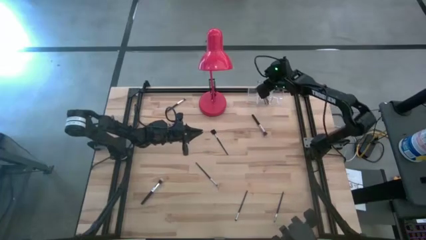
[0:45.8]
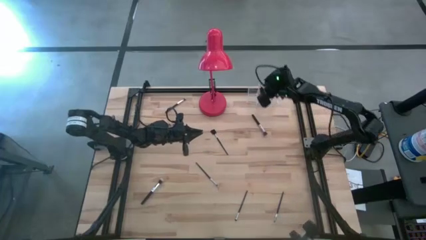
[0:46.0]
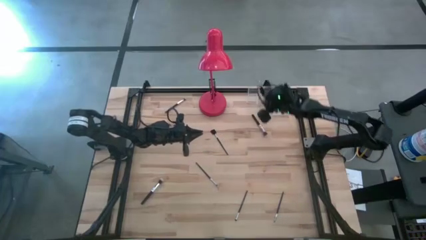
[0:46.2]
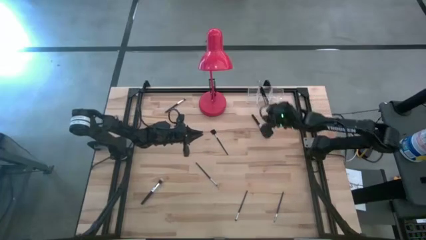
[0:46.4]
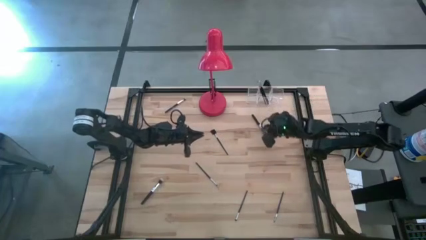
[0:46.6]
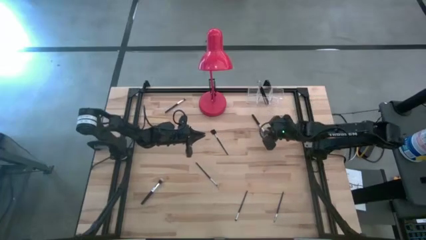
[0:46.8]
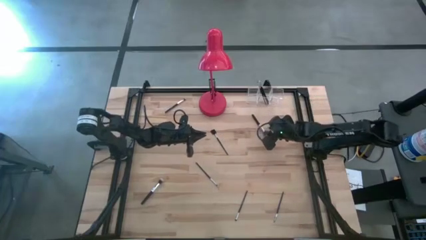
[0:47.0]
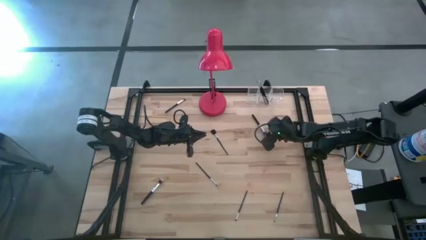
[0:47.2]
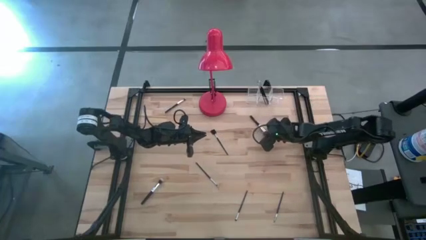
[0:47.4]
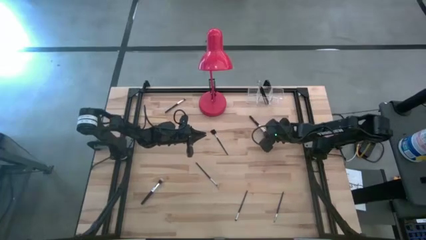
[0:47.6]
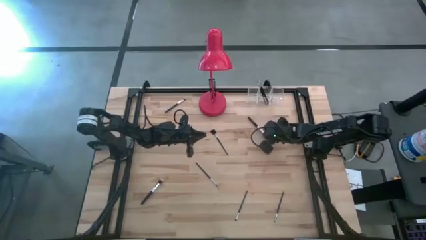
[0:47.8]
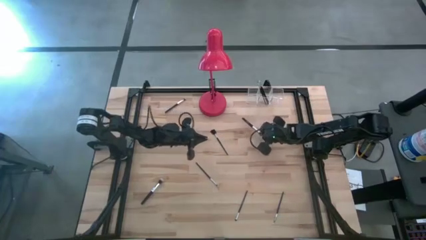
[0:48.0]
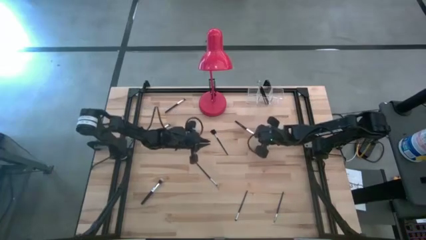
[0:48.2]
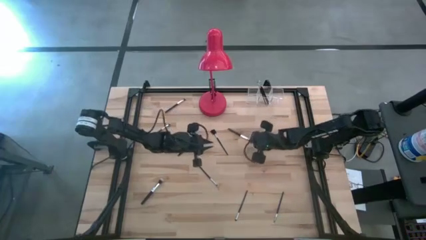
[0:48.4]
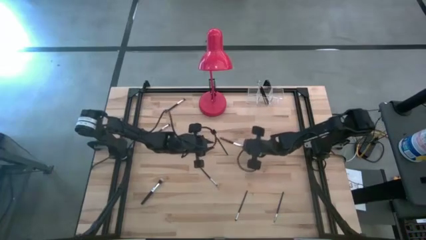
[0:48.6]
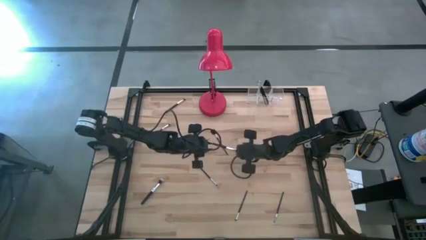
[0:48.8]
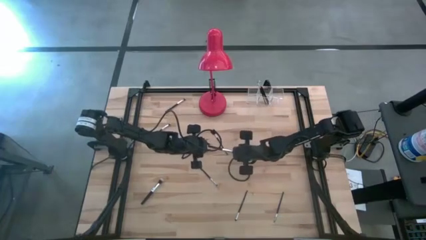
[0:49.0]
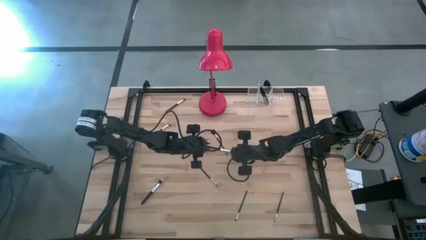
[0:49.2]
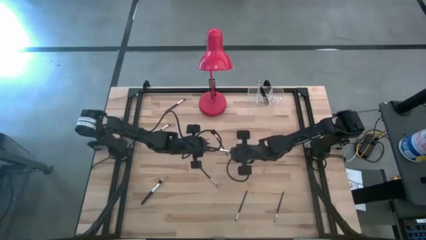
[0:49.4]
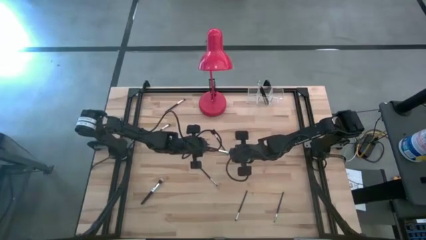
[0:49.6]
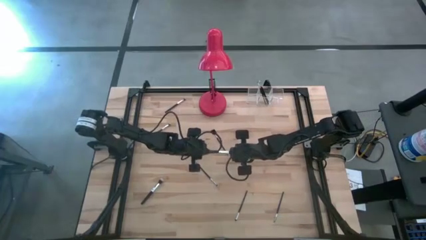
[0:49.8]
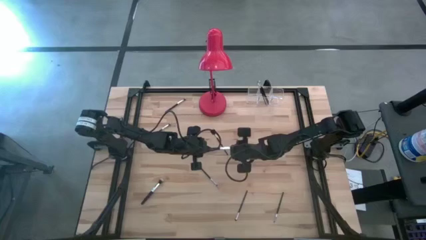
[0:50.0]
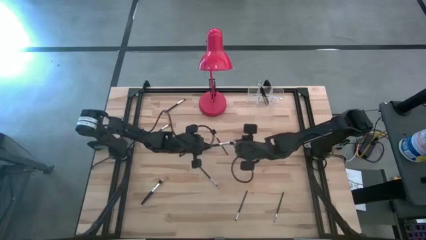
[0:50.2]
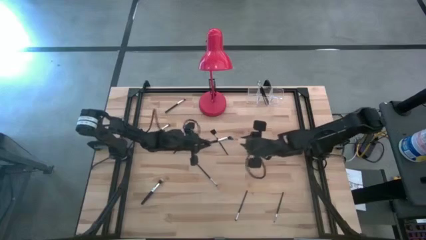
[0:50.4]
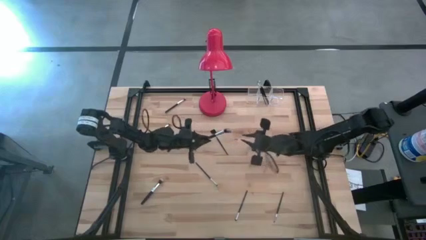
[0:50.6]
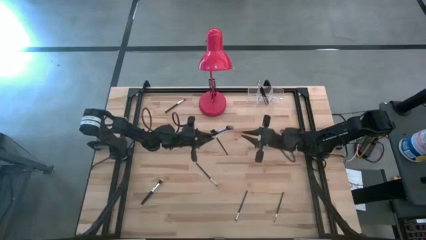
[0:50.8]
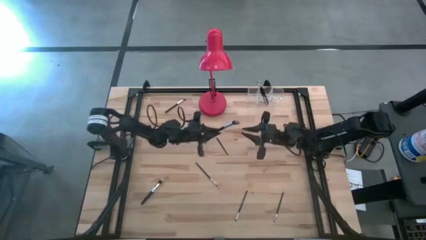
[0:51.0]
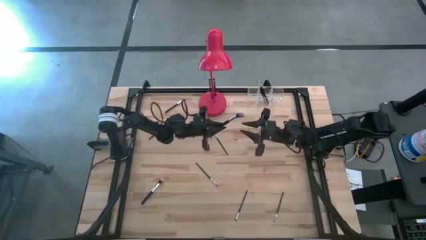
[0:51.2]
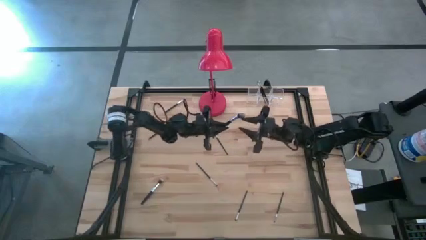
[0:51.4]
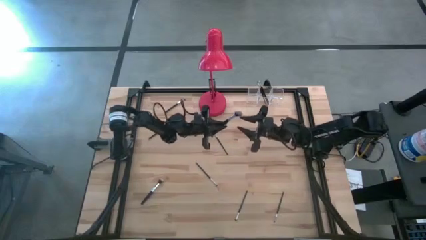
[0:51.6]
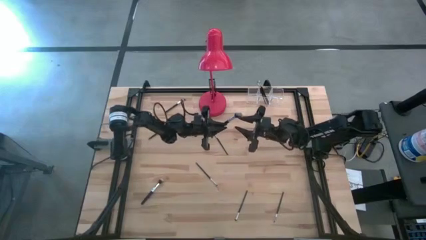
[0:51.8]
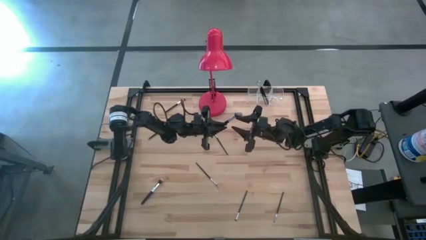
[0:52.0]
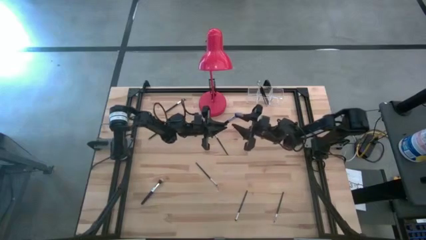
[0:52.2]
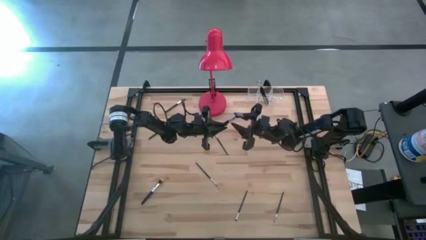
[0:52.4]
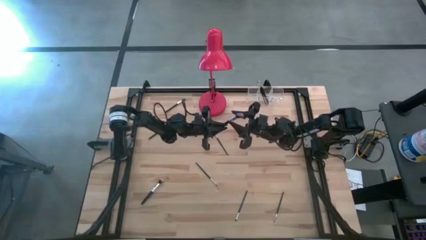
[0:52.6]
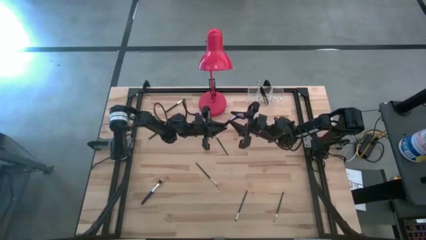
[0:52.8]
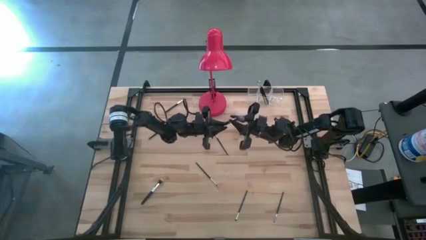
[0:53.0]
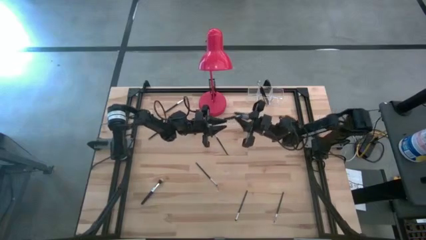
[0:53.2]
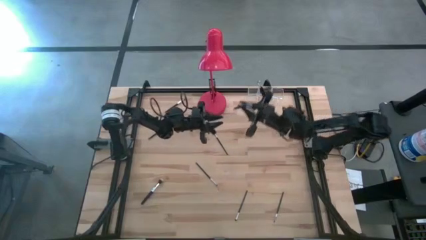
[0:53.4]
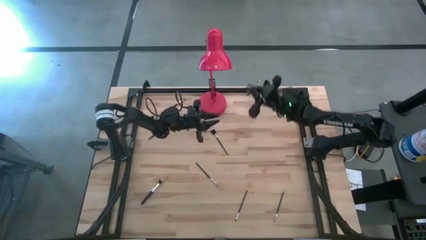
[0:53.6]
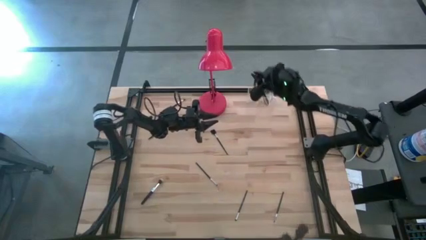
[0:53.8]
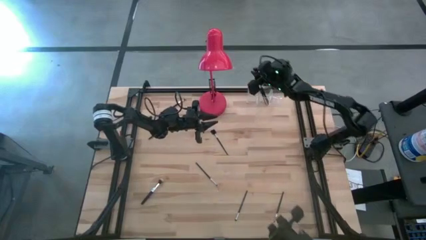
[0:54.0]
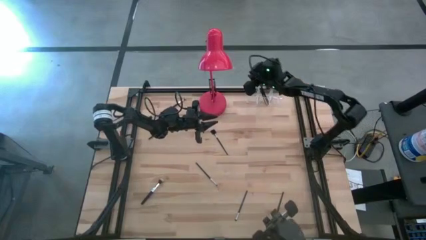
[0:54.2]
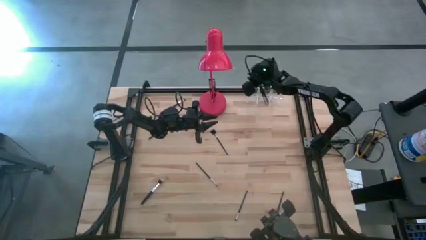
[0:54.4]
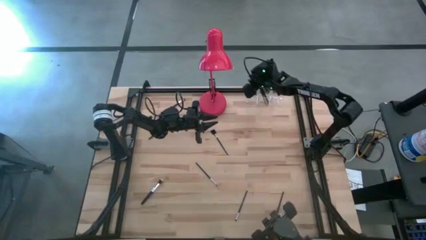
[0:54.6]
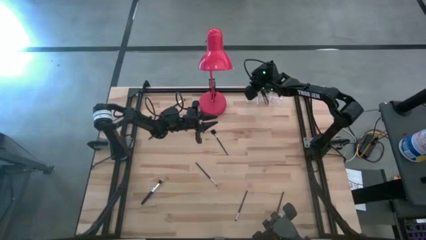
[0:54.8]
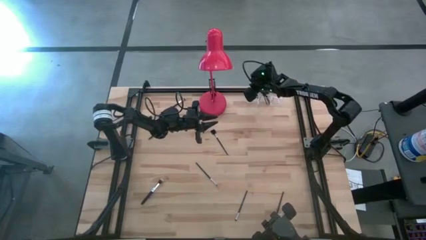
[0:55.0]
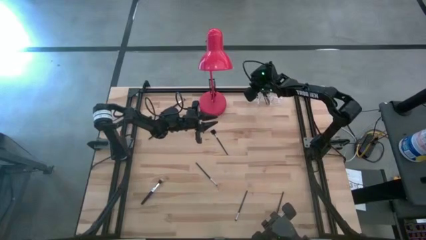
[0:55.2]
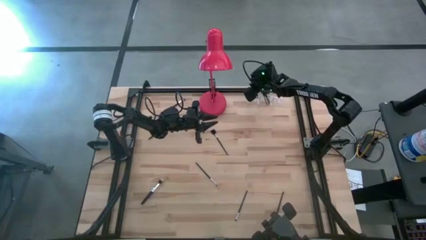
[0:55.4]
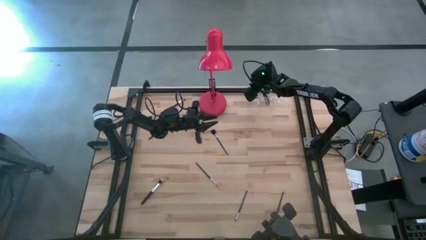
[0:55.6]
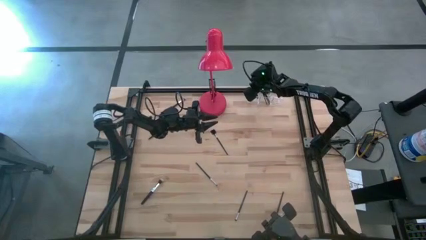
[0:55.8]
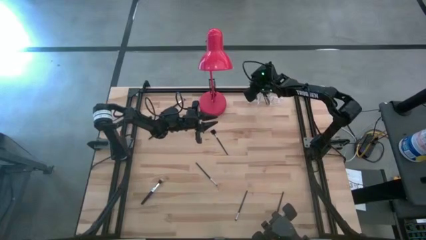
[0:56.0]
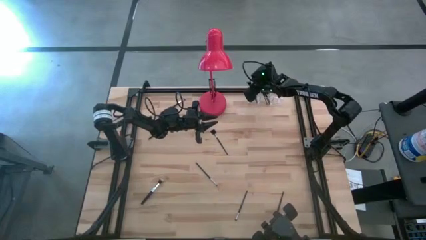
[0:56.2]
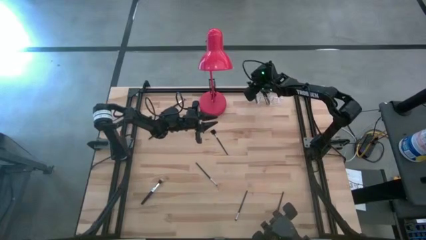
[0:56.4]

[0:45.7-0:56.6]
Task: Sort items
Put the black powder brush into the transparent organizer

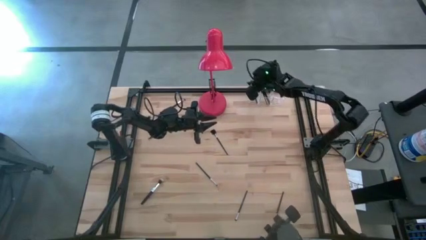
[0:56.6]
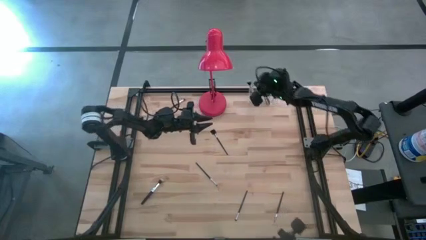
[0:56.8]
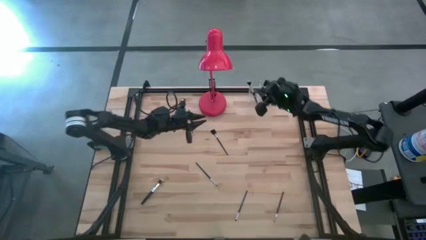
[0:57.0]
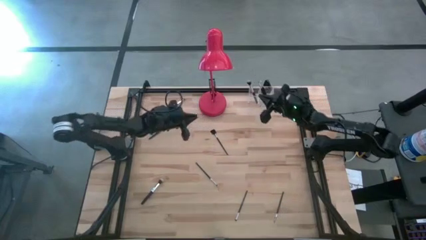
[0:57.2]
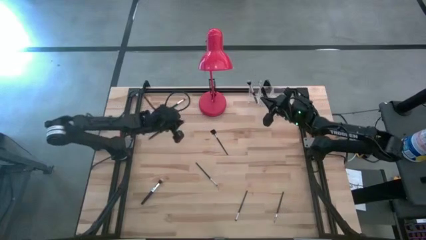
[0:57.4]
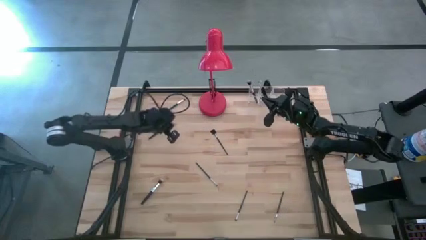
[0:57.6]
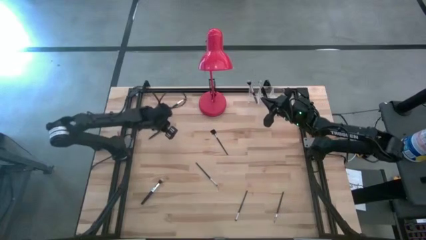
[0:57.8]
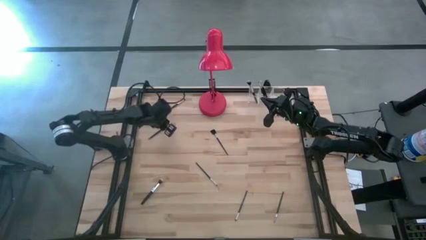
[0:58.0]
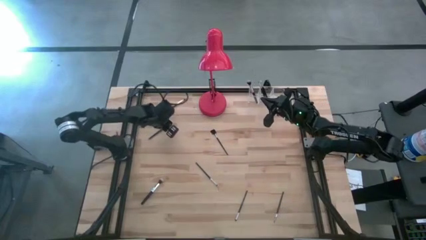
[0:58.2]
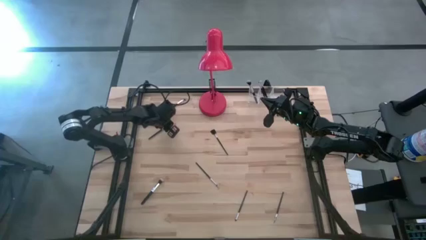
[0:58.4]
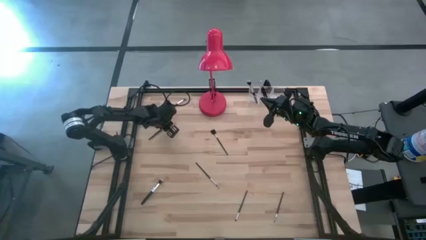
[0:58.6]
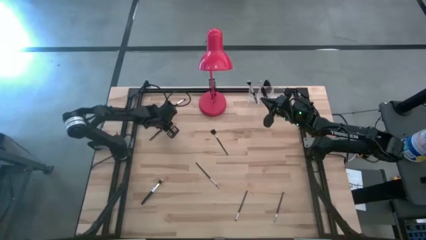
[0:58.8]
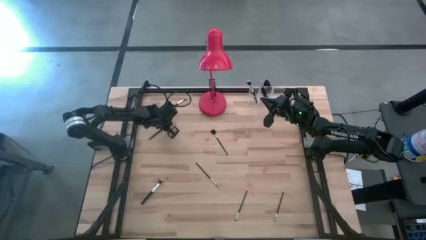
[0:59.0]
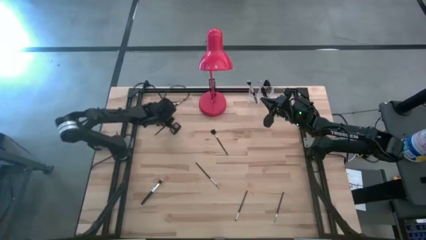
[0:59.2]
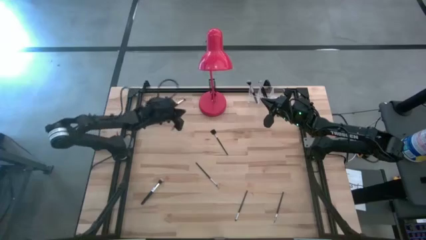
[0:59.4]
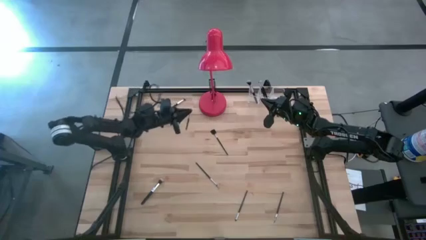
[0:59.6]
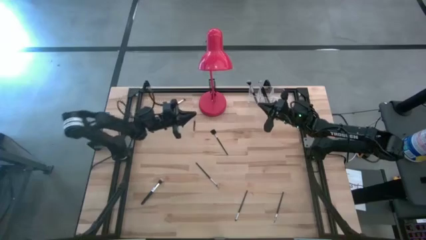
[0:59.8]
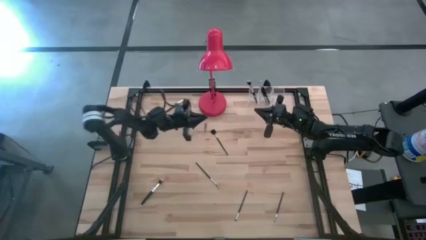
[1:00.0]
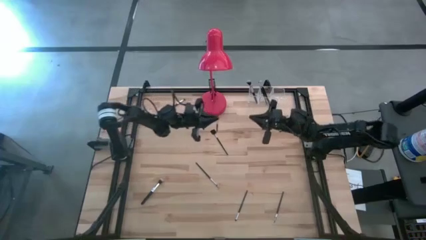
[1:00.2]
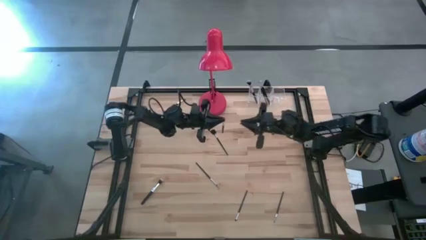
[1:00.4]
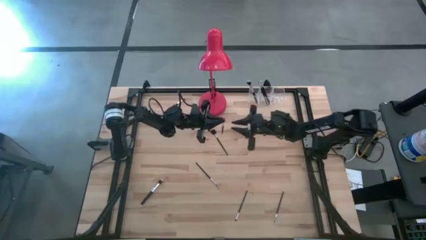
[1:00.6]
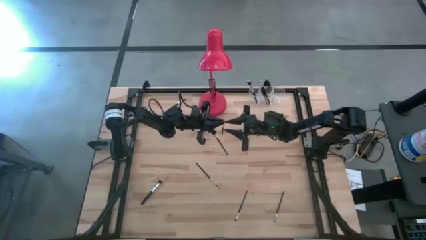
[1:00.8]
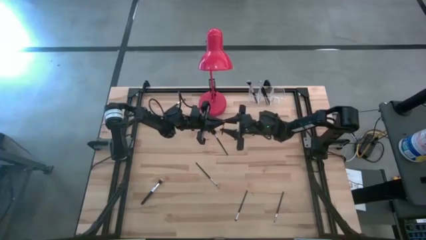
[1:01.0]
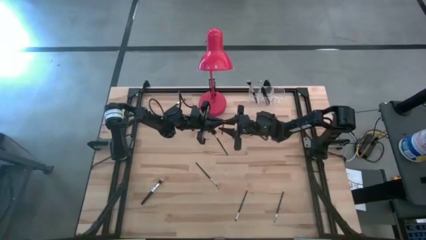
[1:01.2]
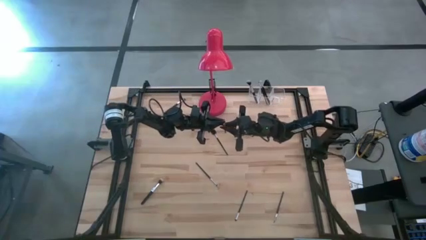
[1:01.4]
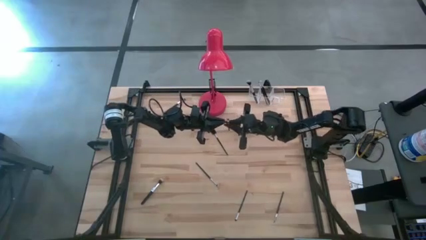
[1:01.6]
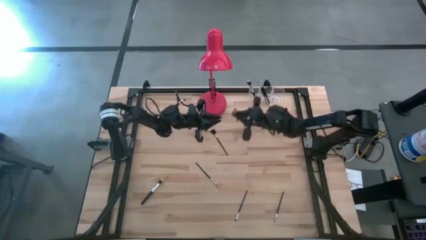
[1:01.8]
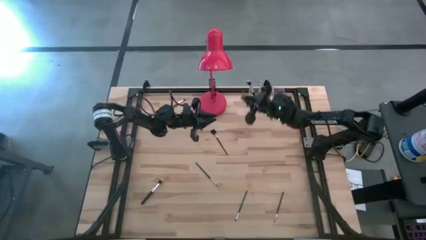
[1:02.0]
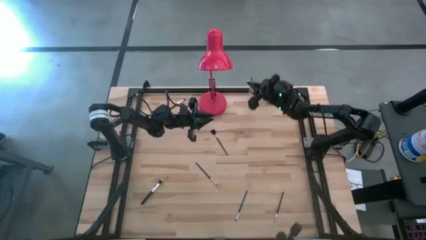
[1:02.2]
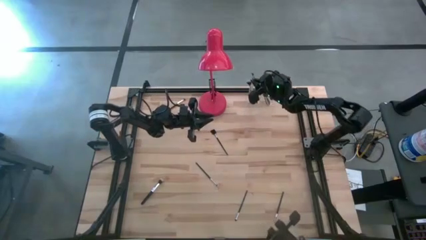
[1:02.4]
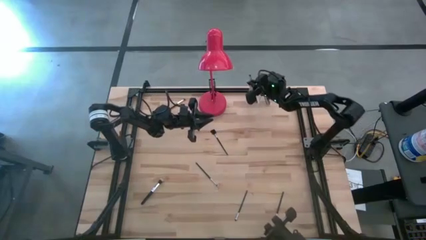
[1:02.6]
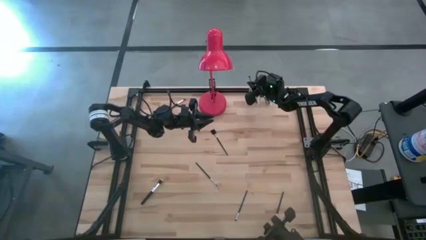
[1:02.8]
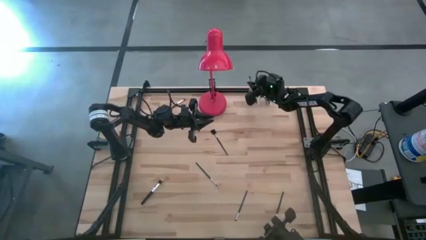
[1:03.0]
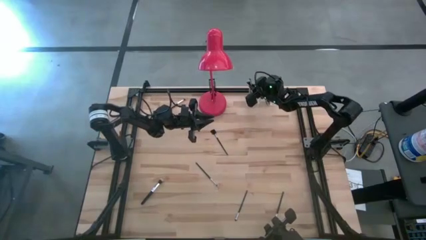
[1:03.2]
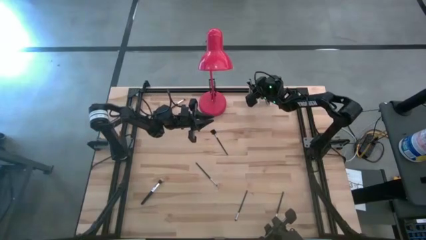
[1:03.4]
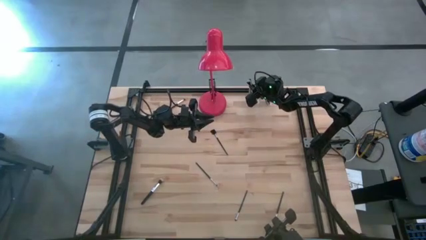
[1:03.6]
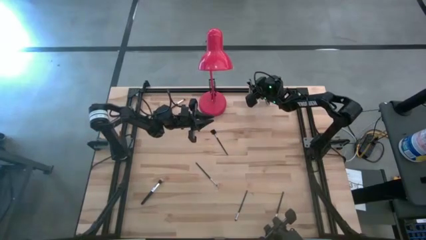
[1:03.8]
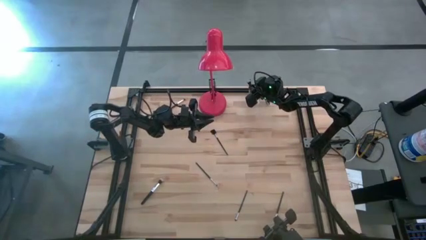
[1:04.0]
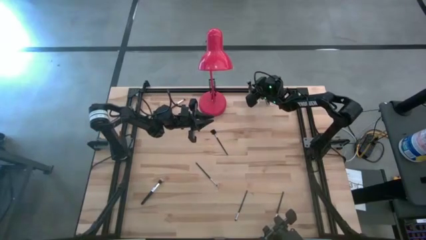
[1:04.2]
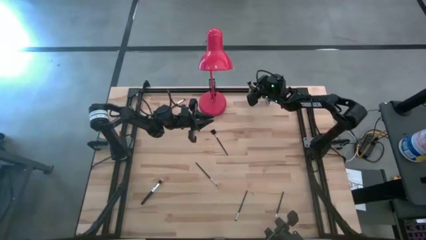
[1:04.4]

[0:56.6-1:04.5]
Put the black foundation brush into the transparent organizer
